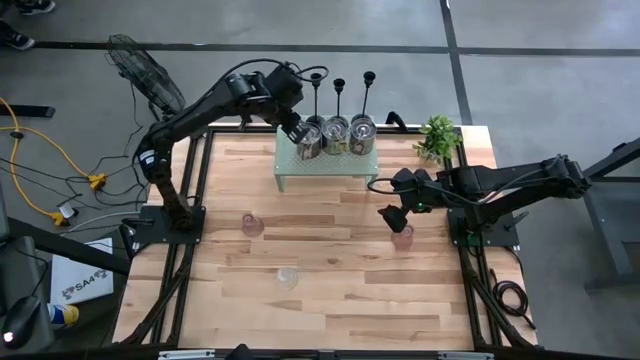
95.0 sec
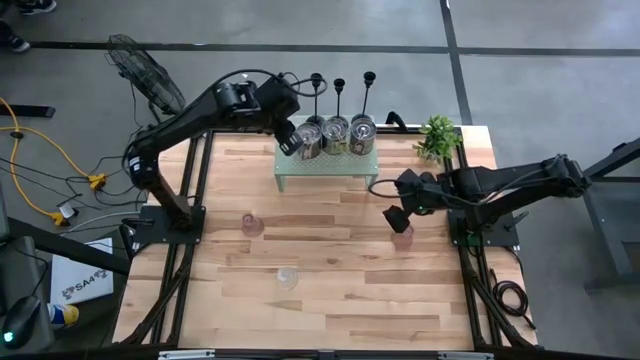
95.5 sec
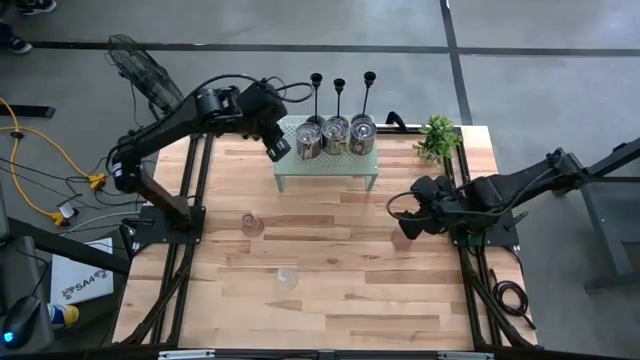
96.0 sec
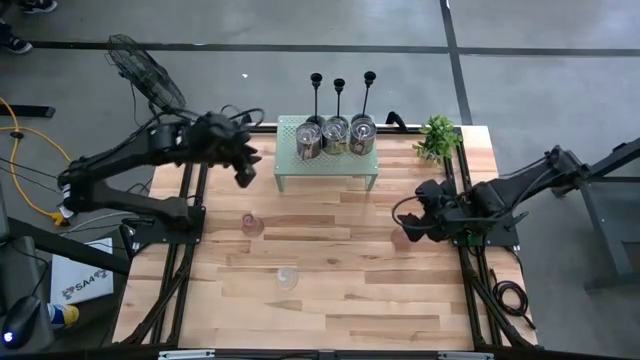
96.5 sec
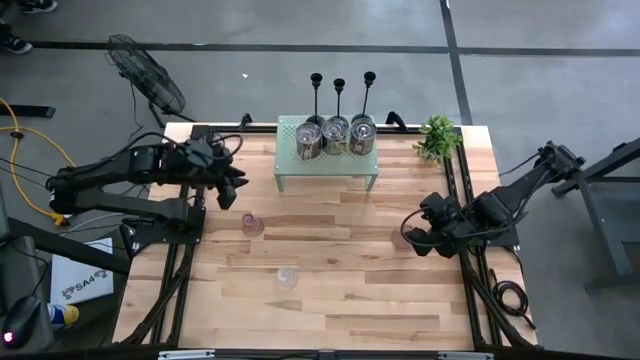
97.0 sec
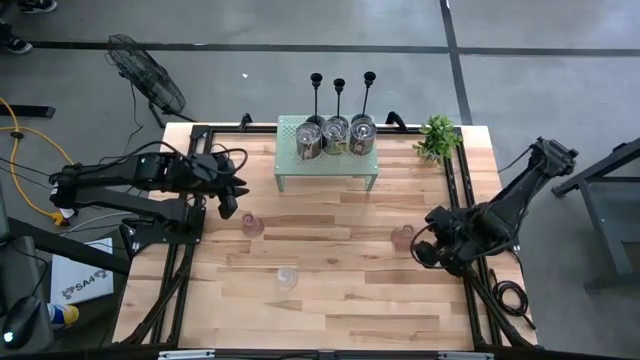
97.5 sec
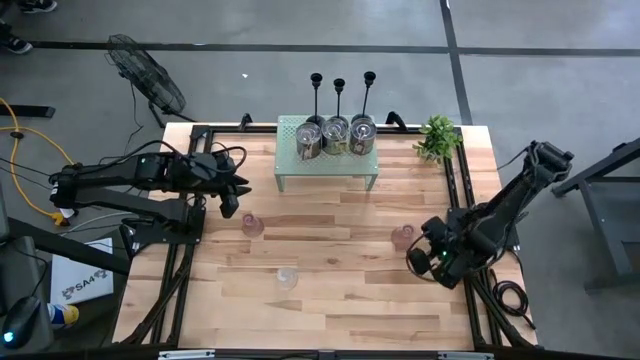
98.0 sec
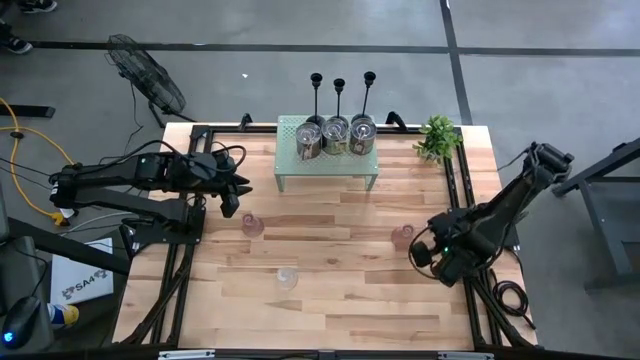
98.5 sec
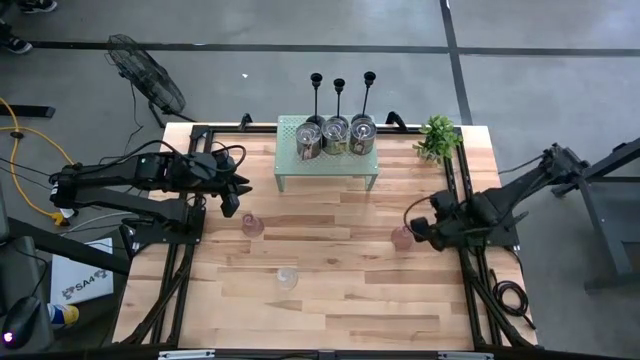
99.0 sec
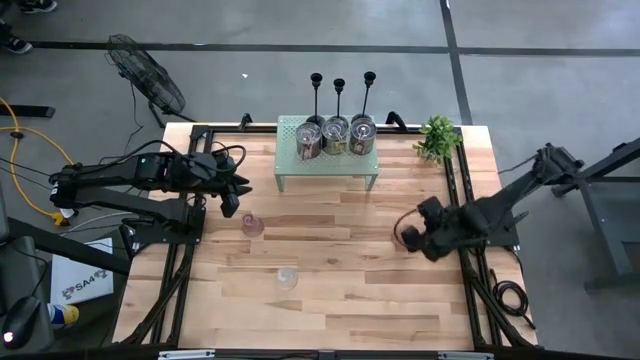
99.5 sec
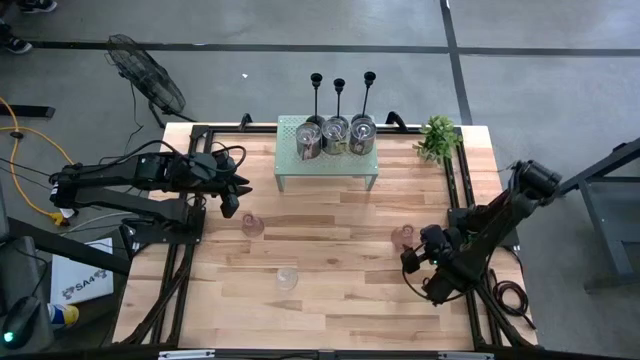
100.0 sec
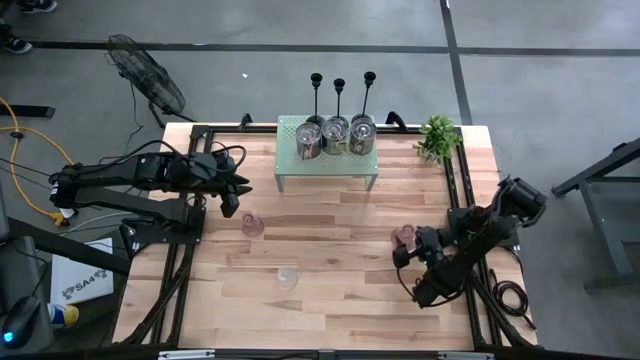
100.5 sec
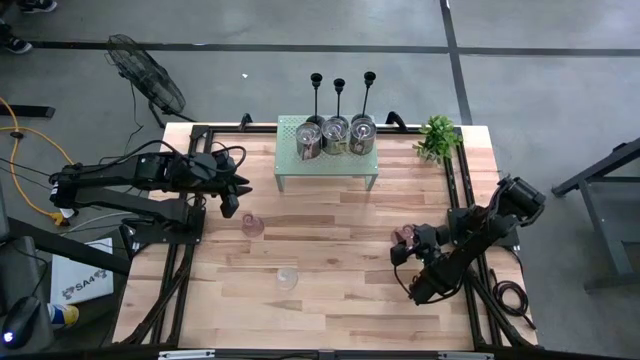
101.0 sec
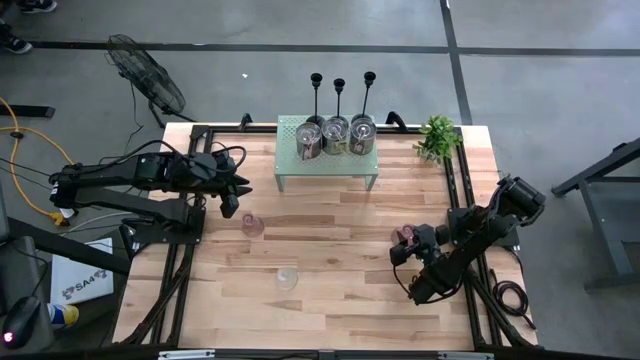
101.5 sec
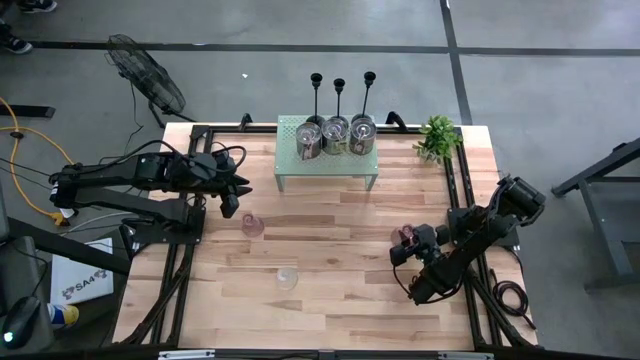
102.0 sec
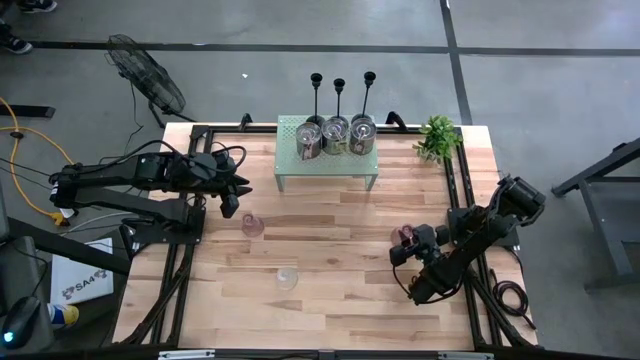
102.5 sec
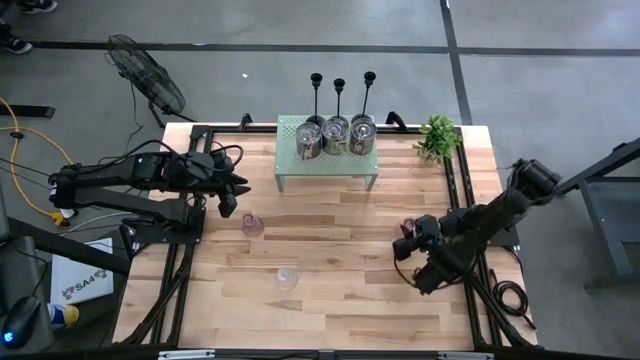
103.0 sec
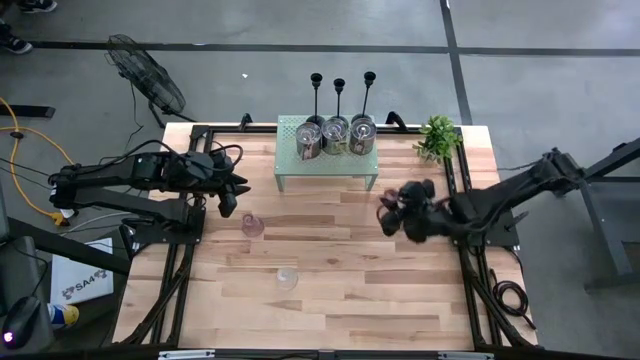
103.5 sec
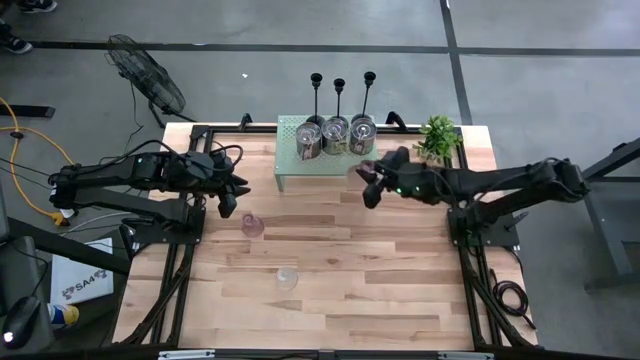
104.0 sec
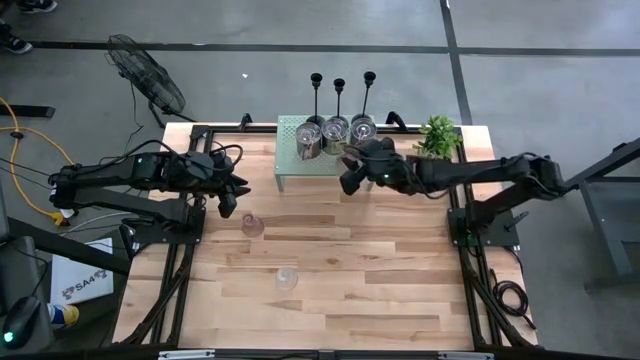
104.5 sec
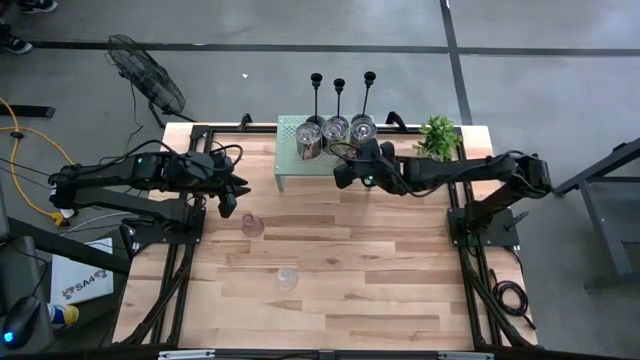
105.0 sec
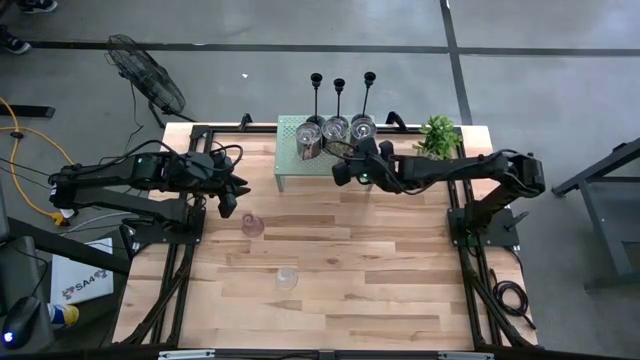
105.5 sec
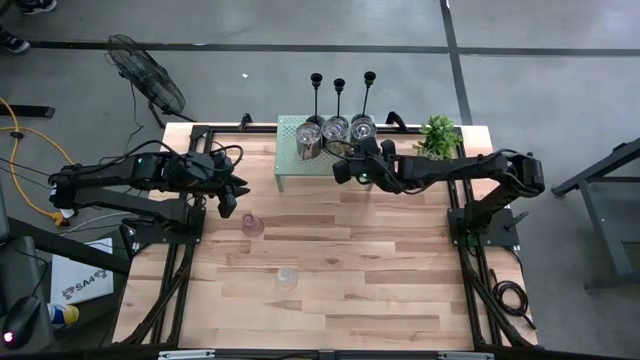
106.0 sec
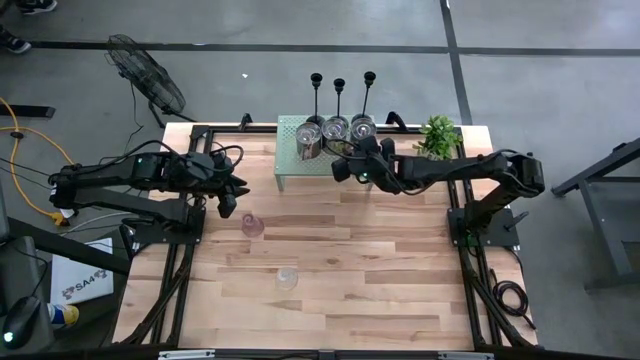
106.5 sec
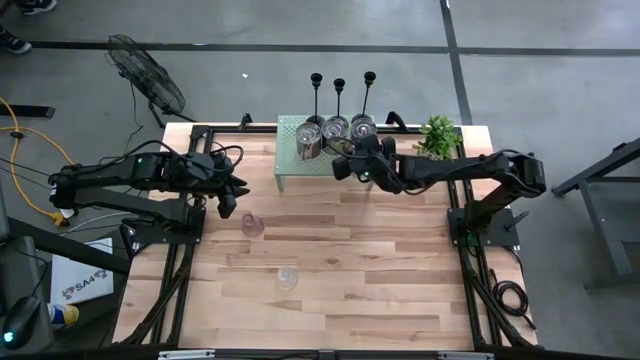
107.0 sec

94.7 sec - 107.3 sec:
Task: Pick & Place candle stick holders
Put the right pink glass candle holder on the shelf

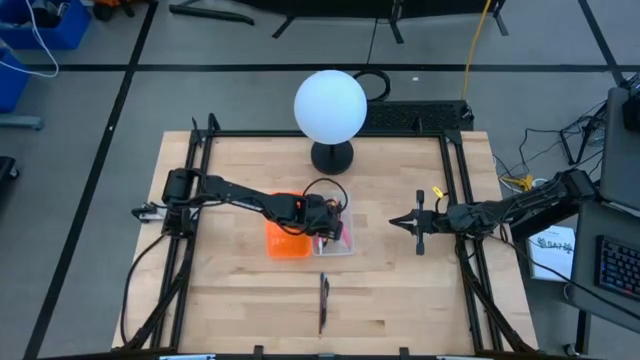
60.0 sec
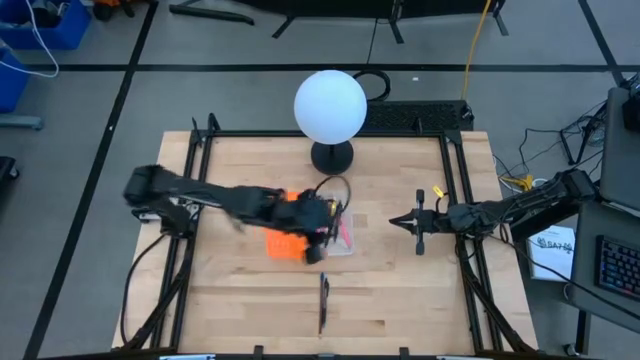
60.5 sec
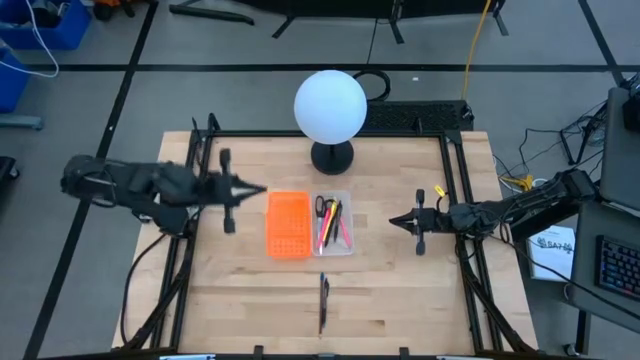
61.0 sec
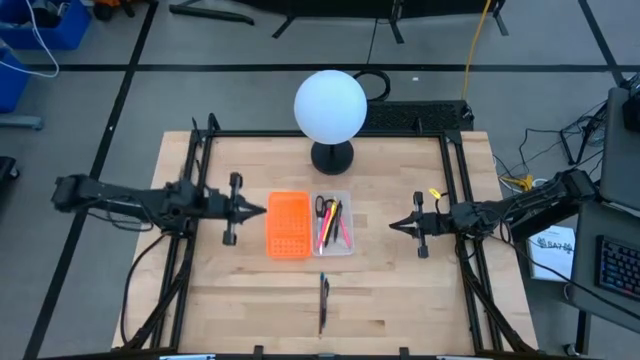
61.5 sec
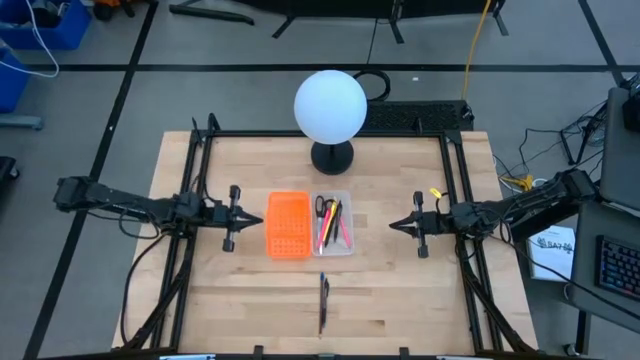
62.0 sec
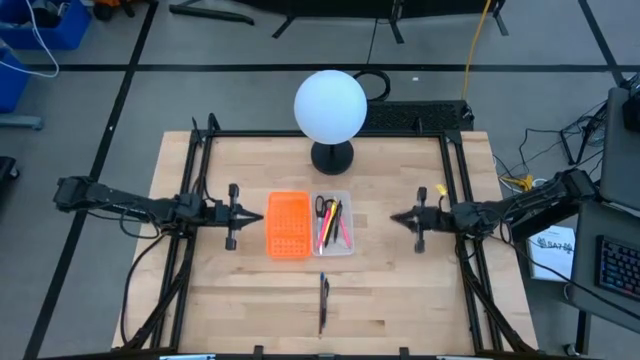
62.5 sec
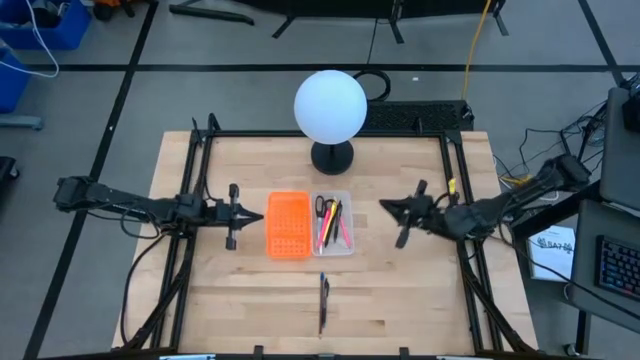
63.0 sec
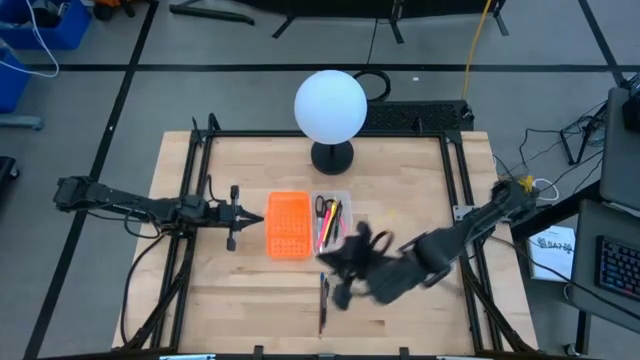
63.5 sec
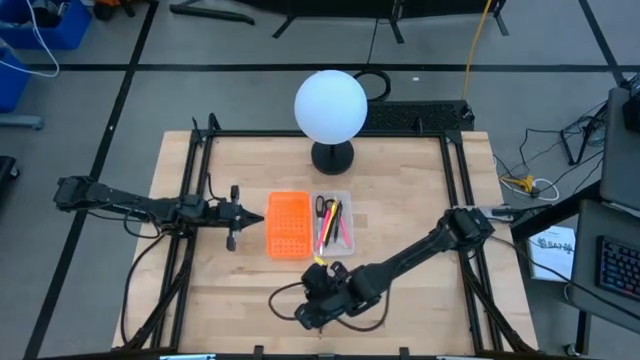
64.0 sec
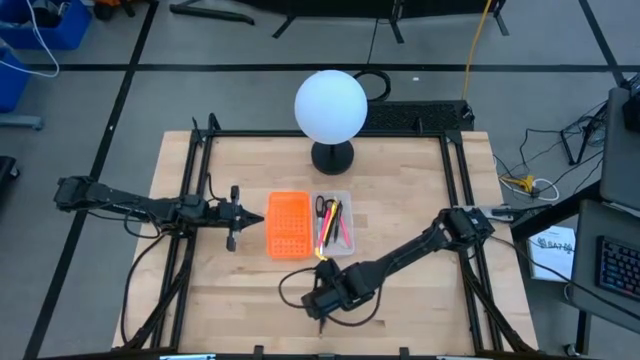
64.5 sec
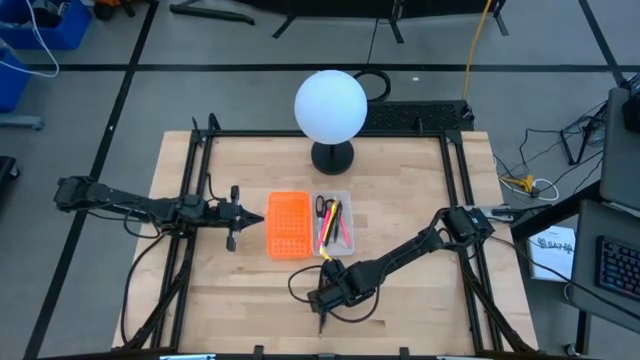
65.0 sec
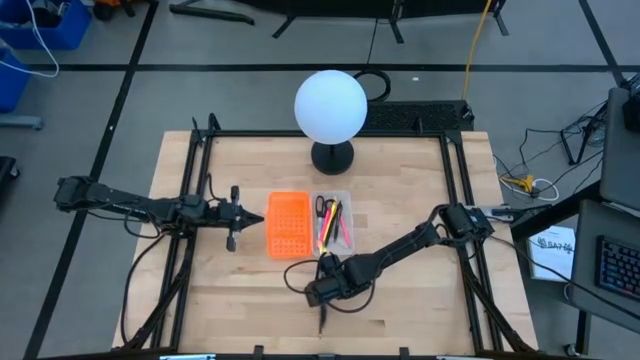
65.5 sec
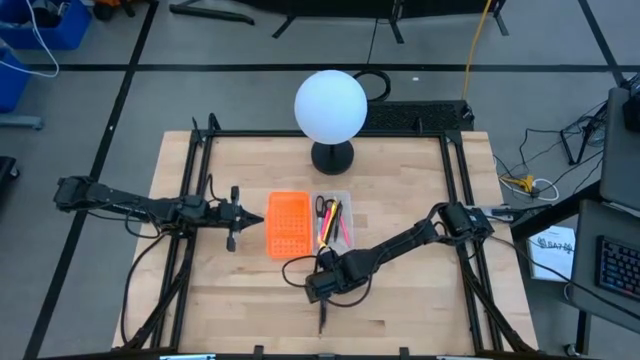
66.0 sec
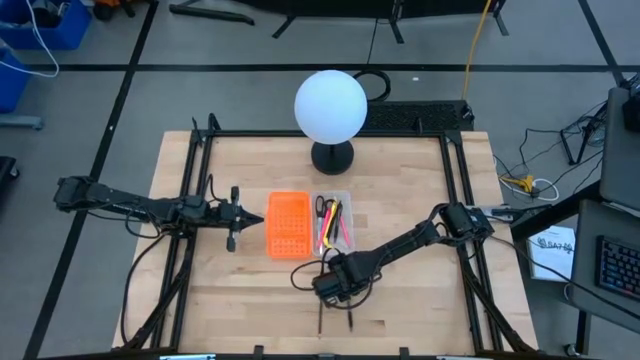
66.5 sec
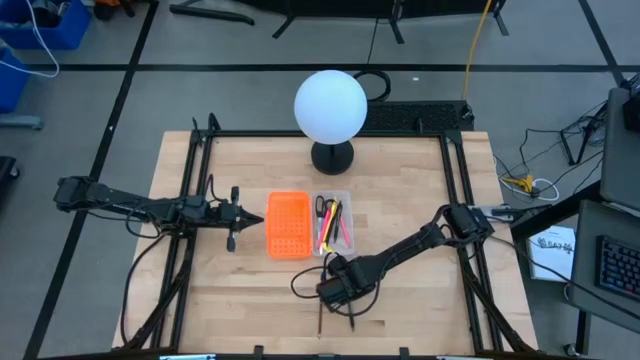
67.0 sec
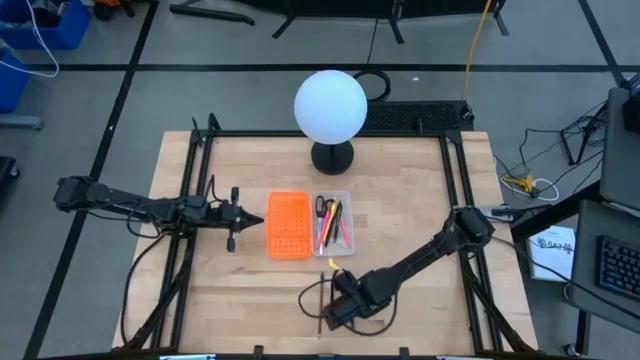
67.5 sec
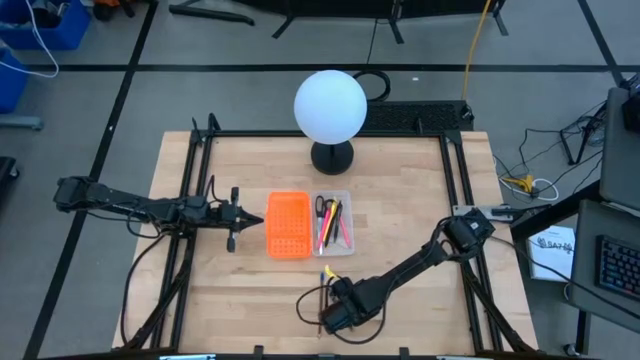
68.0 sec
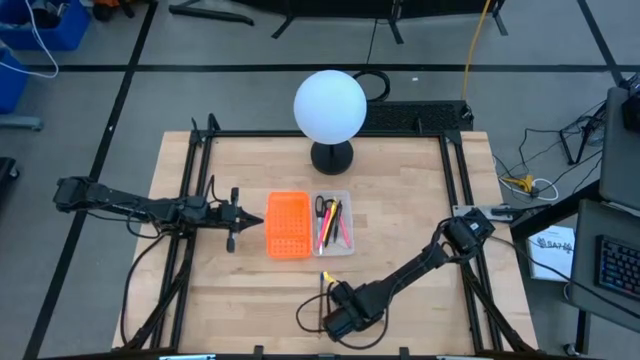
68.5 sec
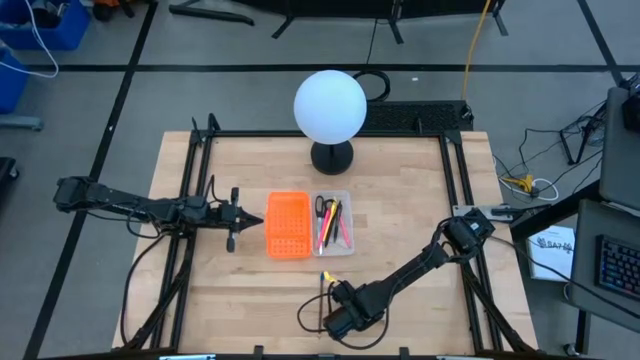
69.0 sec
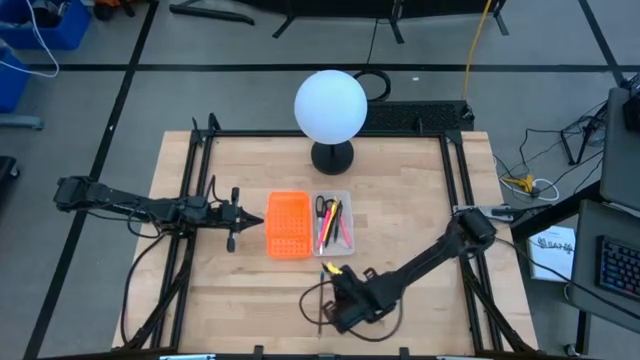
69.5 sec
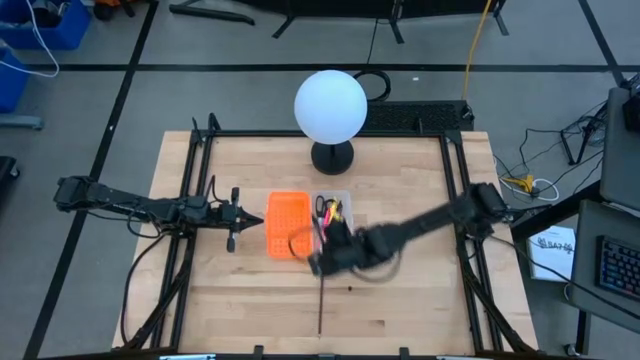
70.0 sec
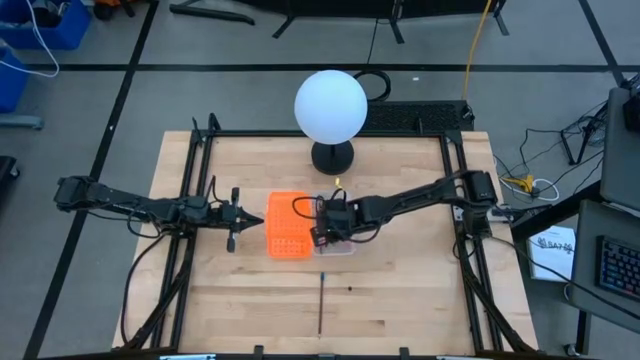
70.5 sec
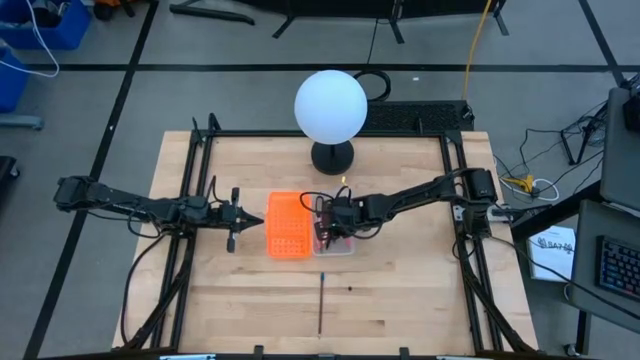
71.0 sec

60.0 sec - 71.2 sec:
Task: Pick & place school supplies into a supply box
Put the black pen into the supply box
